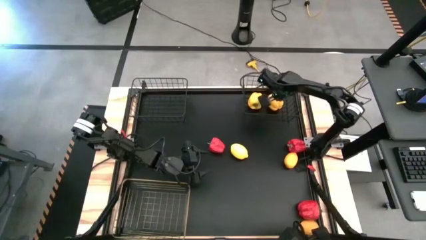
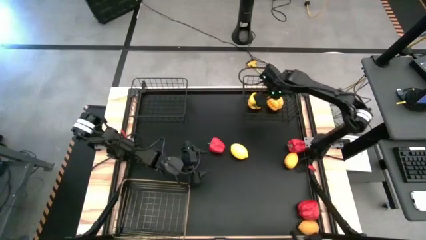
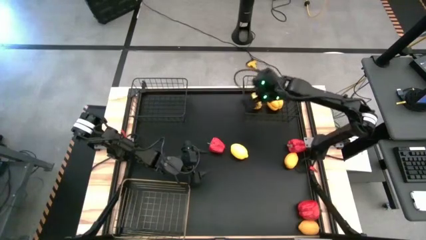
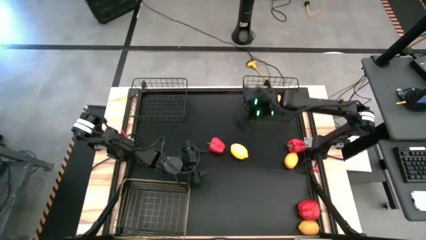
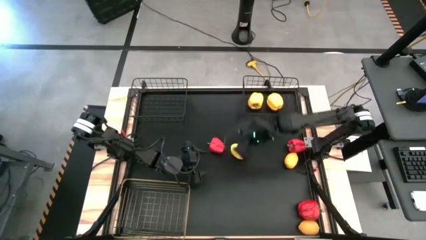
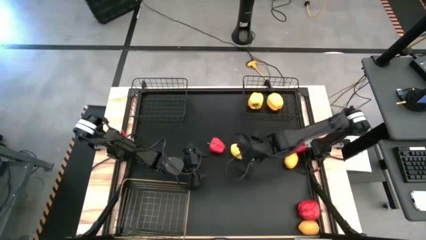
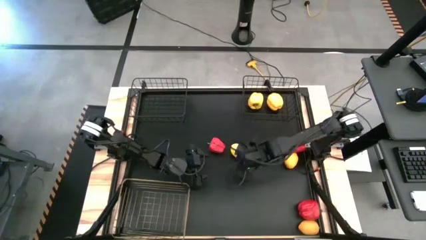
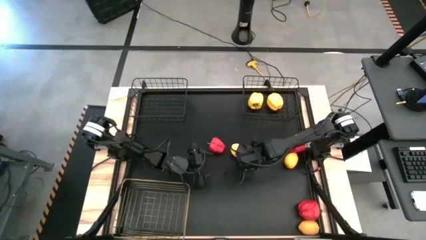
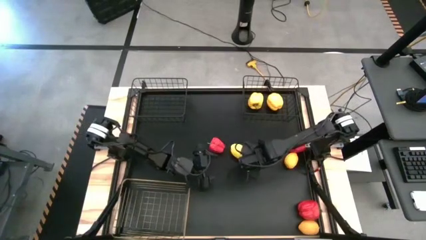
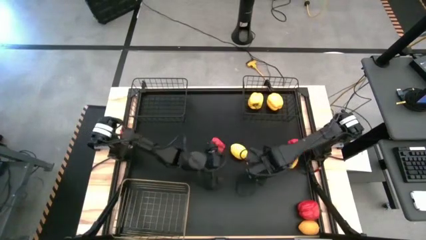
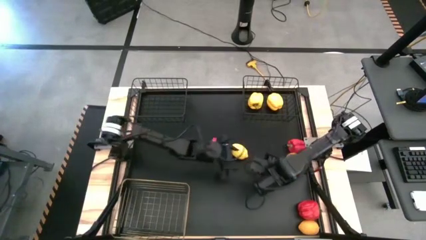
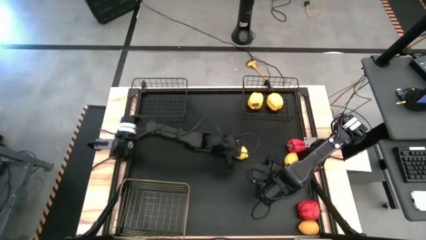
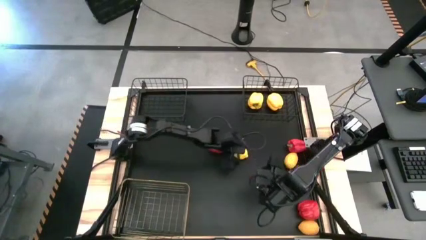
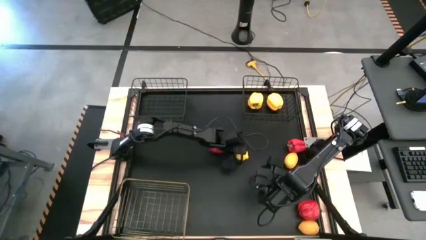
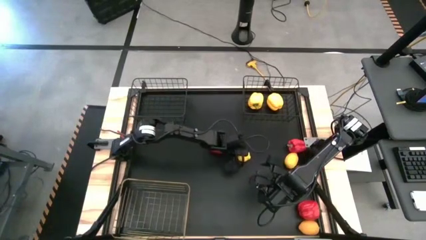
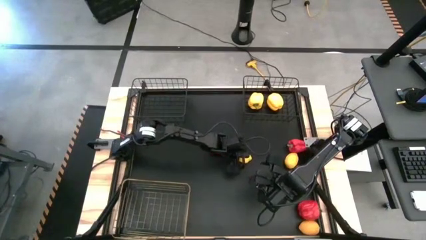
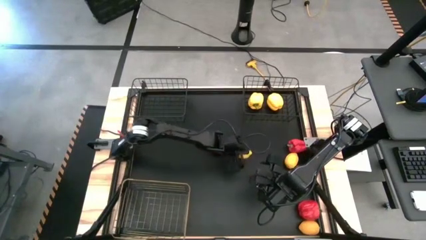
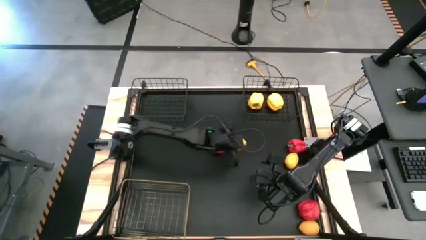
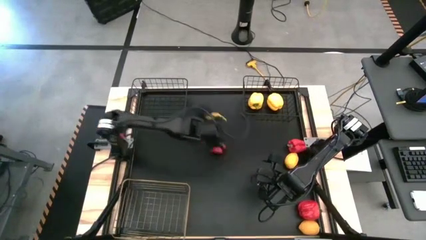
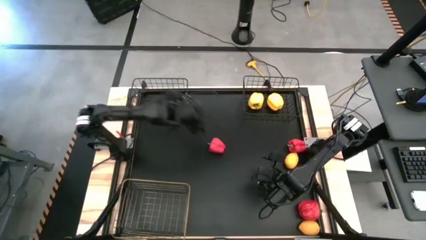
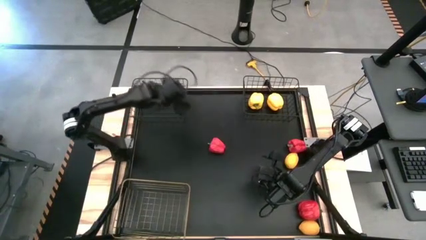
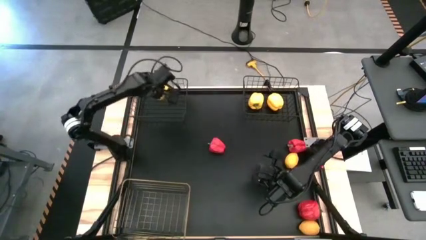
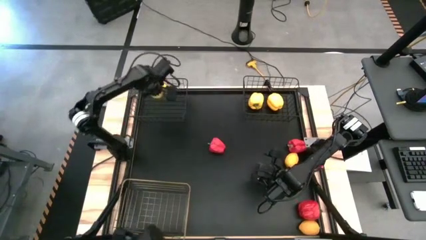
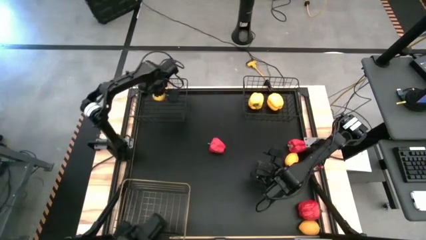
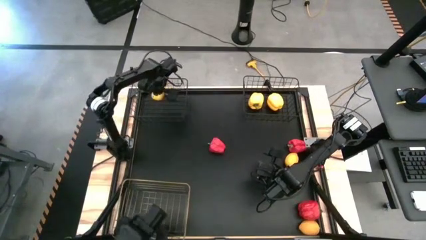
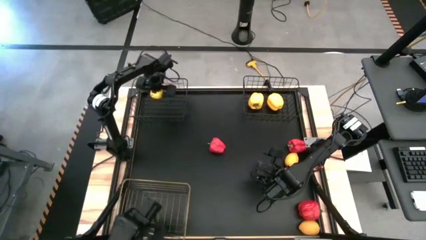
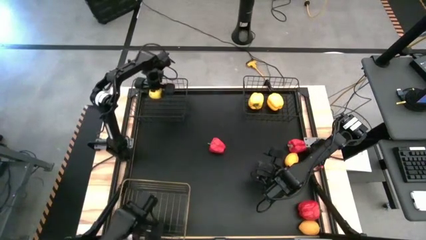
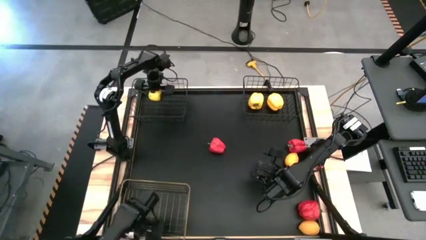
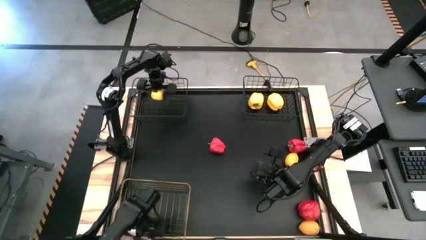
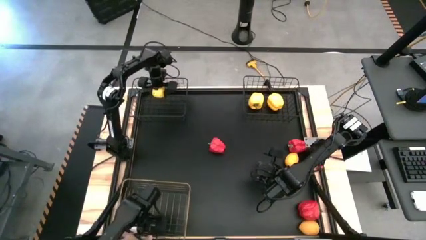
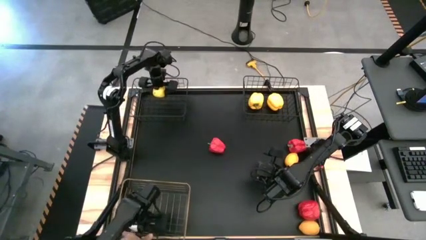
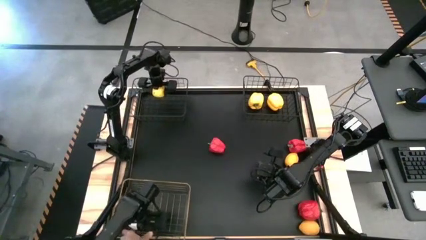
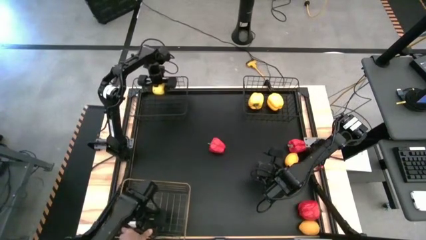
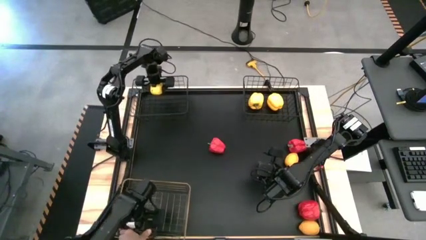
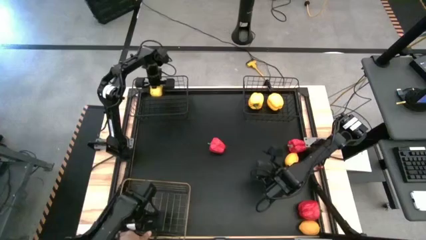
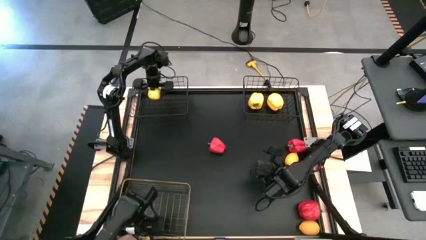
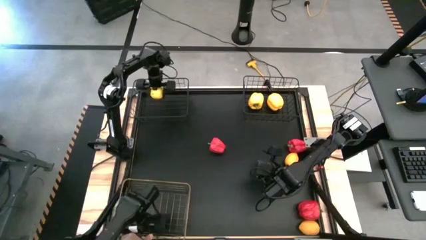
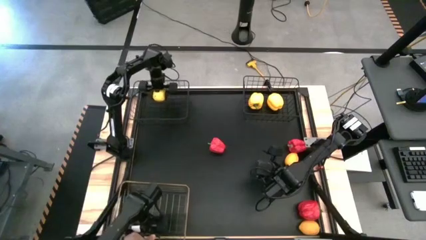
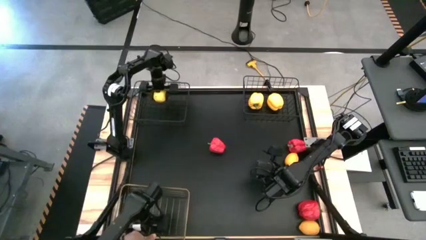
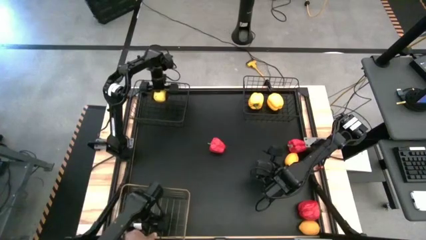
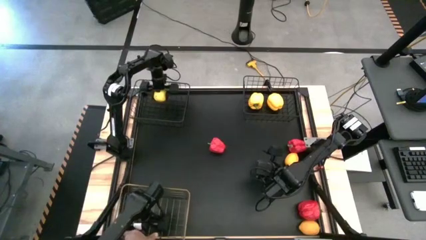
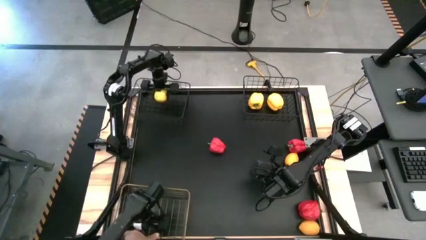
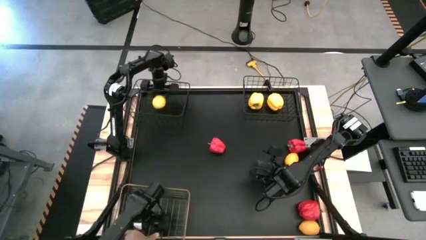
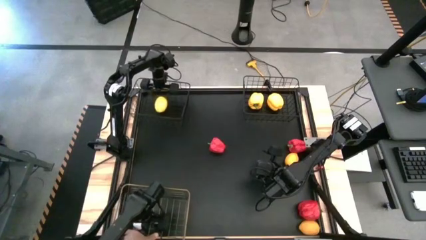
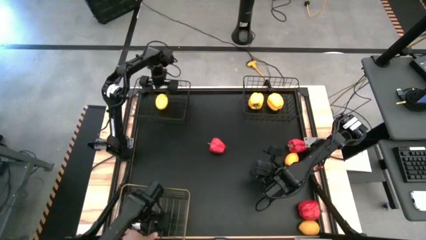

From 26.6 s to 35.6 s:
Task: Sort produce into baskets
Put the top left lemon into the left black wire basket
